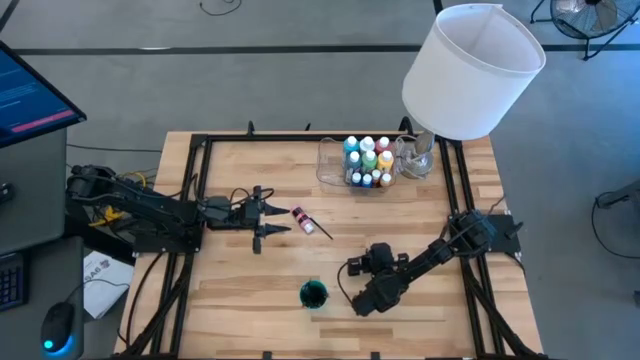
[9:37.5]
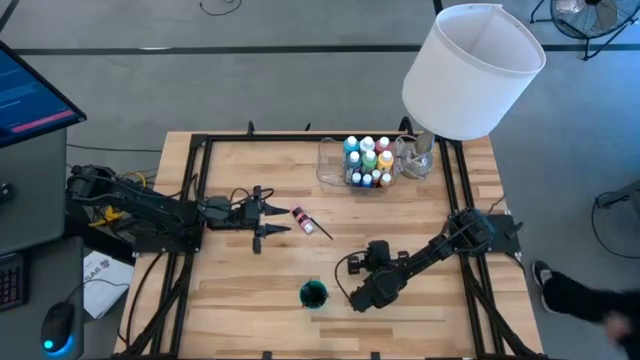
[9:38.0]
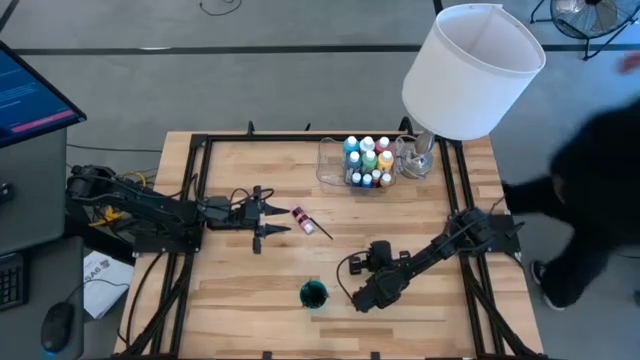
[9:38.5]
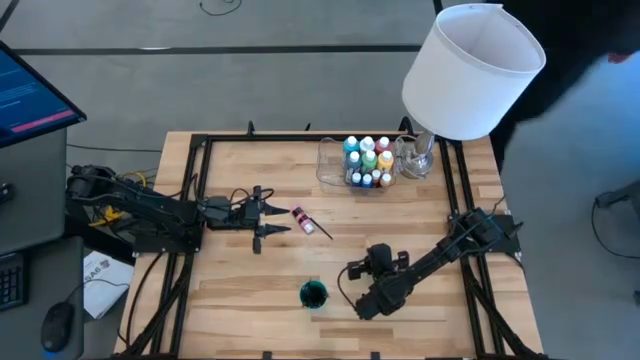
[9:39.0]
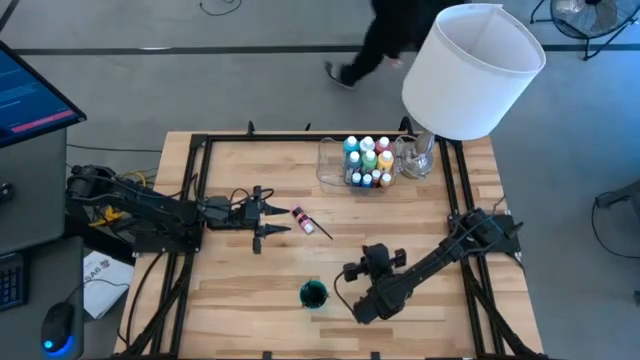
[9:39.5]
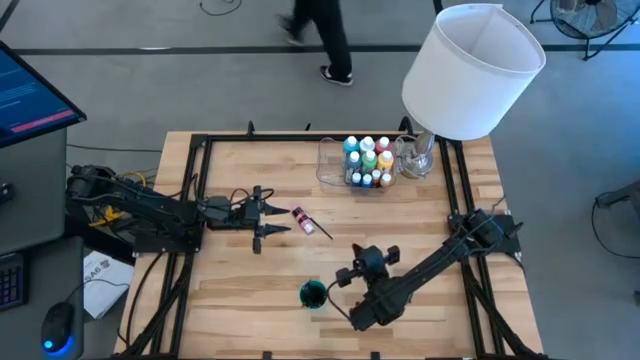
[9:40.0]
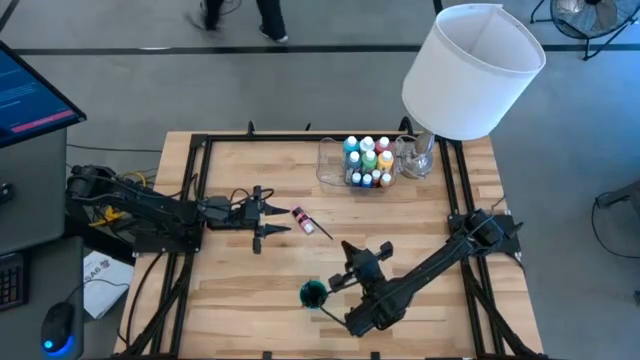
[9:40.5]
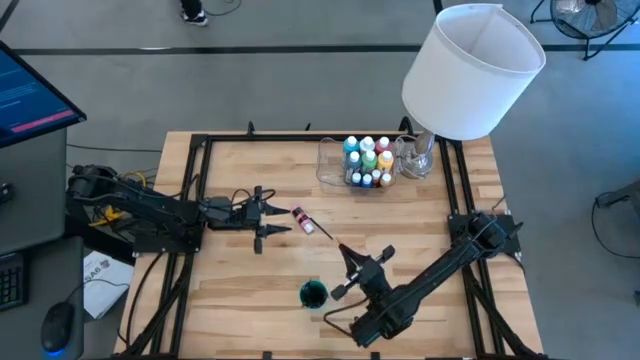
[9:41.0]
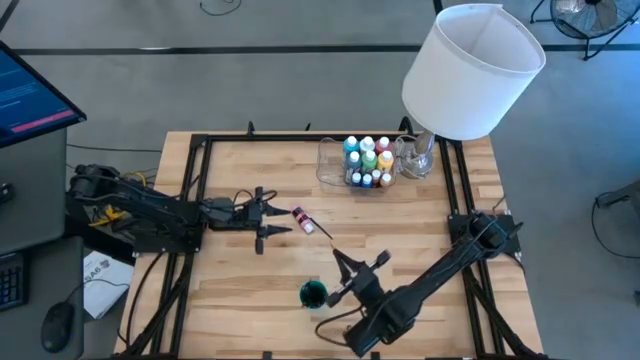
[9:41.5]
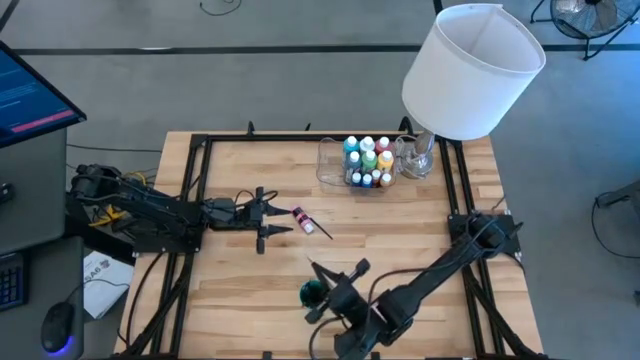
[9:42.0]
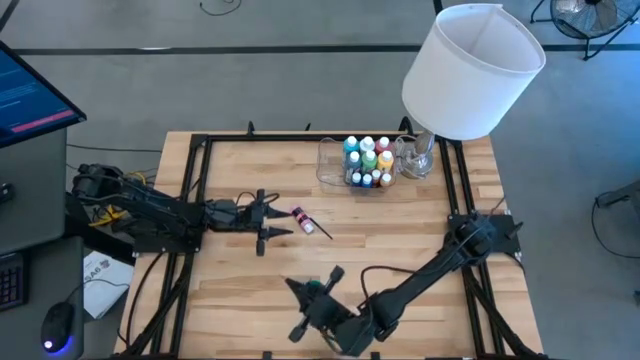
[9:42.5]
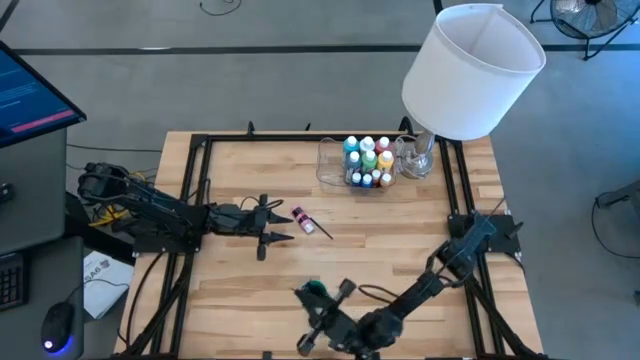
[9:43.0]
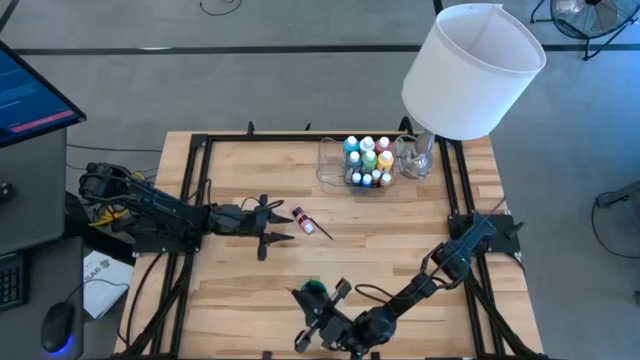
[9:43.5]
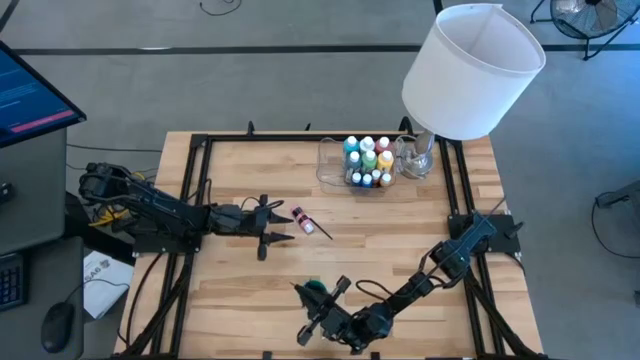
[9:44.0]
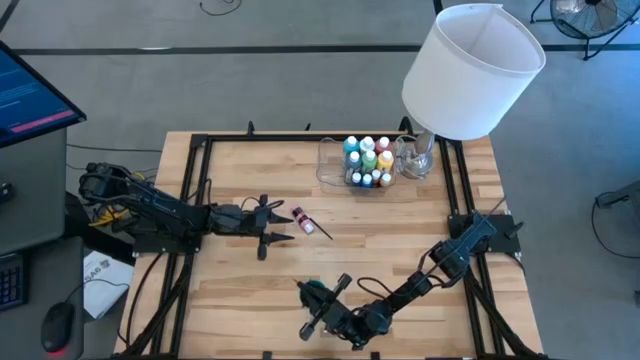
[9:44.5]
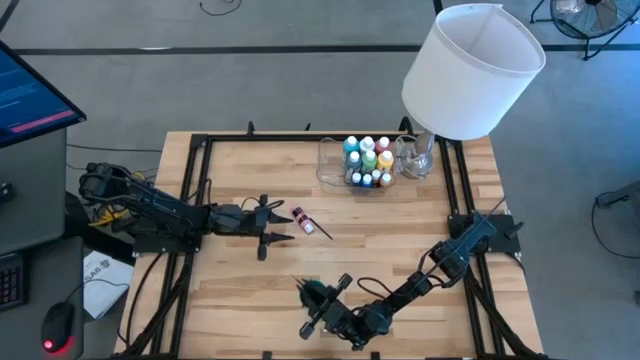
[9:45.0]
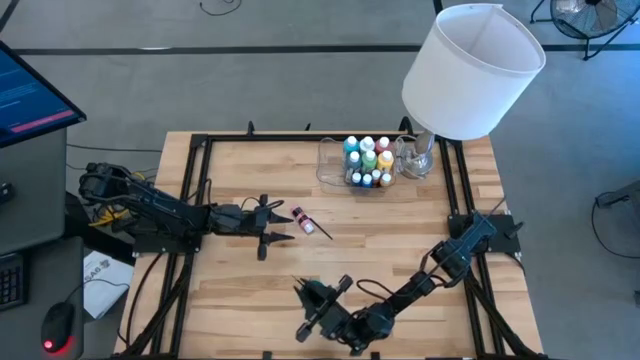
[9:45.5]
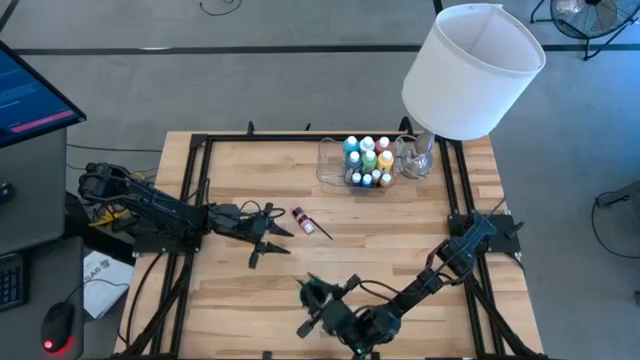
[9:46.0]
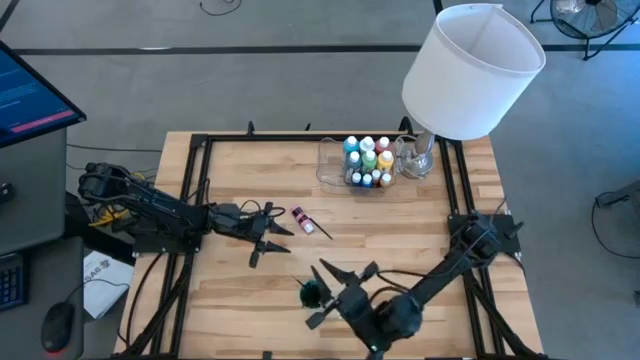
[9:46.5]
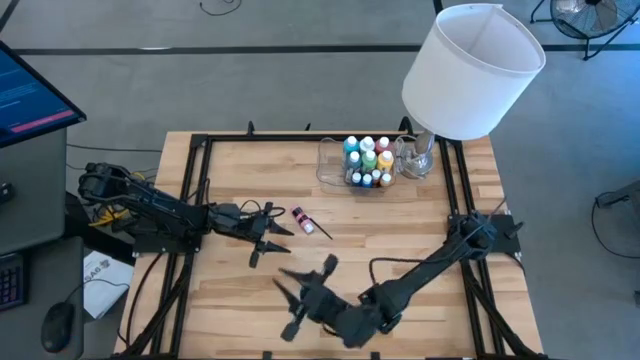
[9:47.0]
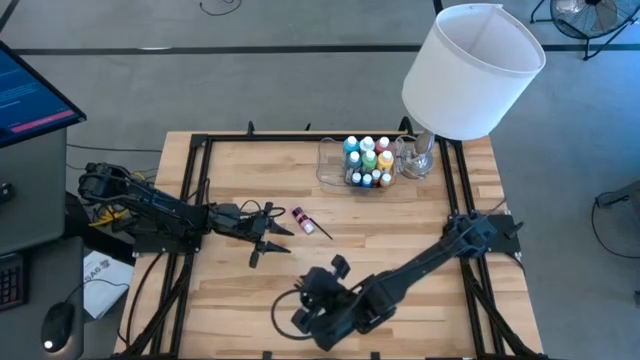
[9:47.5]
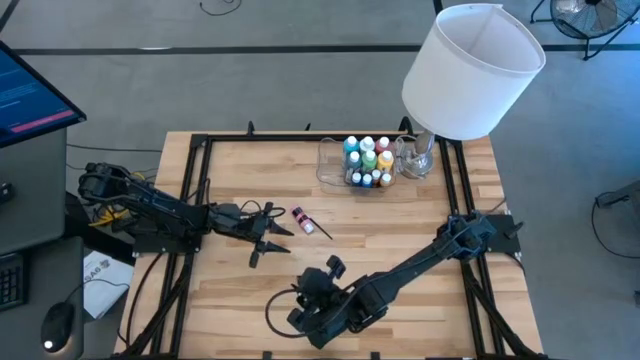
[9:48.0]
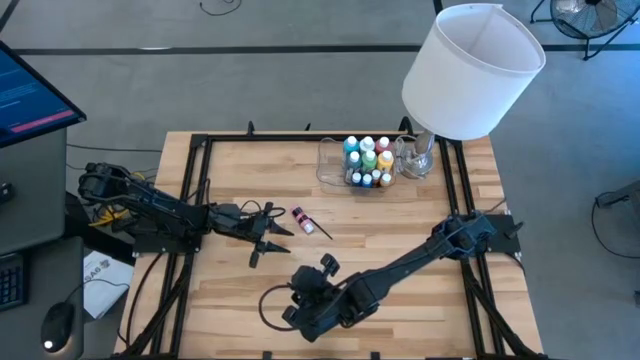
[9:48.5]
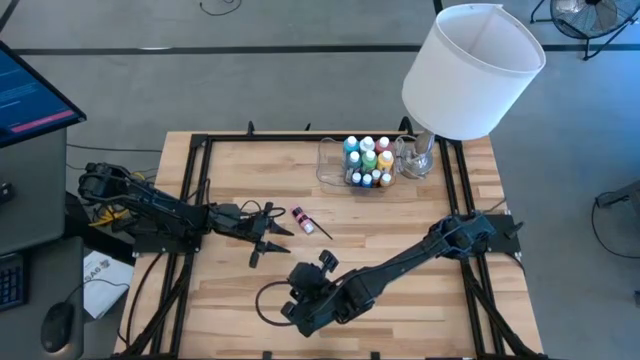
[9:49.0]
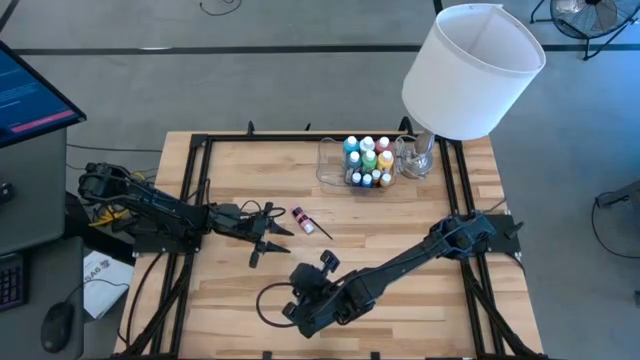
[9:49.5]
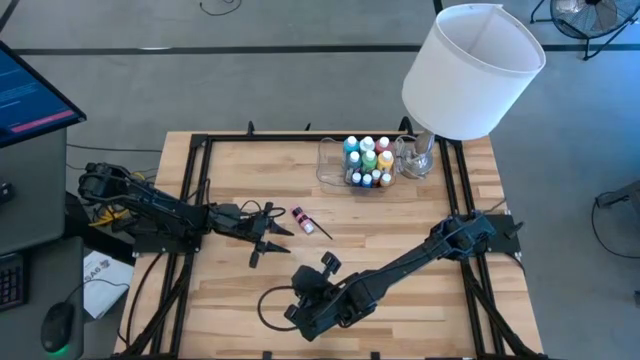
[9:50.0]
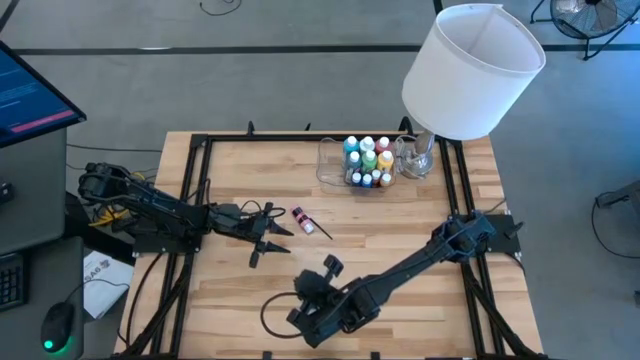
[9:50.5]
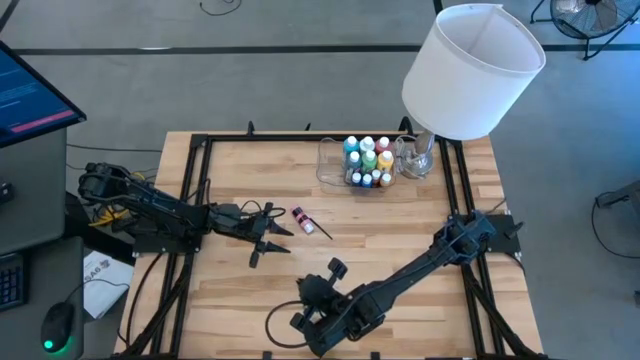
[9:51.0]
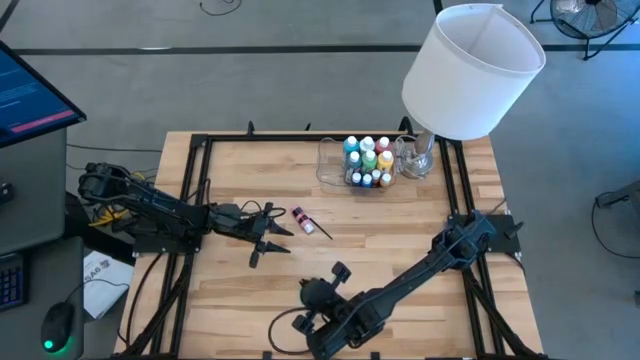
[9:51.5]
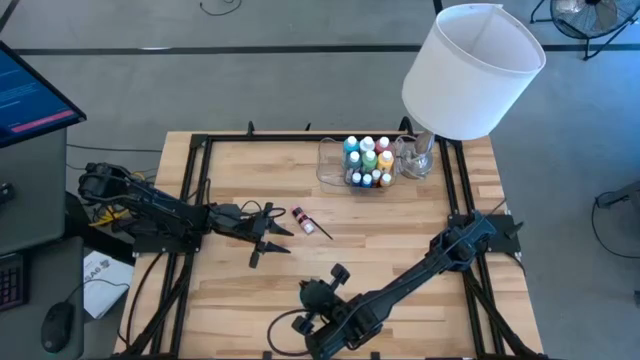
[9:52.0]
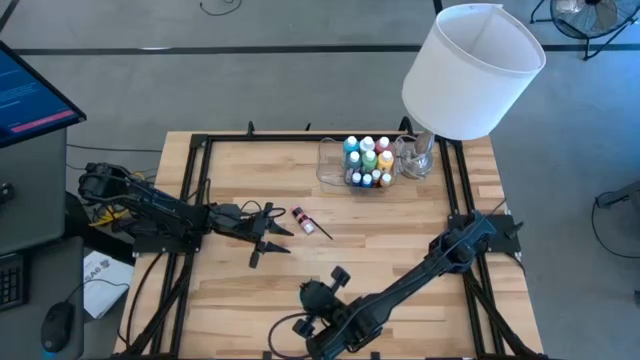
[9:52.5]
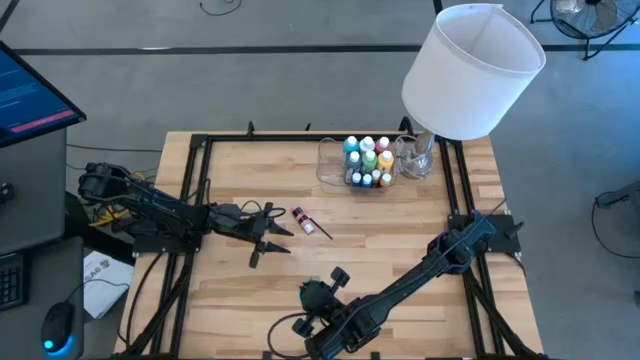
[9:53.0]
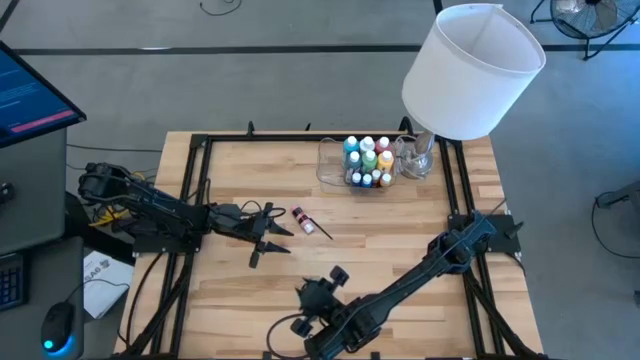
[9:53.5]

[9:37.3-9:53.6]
Task: Pick & Place Paint Supplies
Put the gold paintbrush into the green cup
